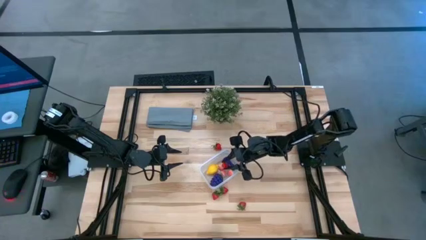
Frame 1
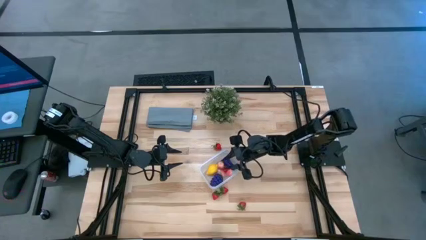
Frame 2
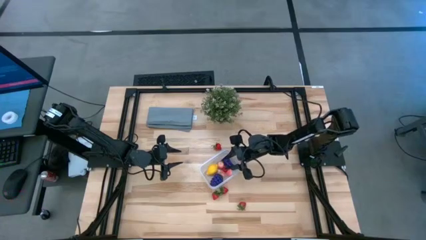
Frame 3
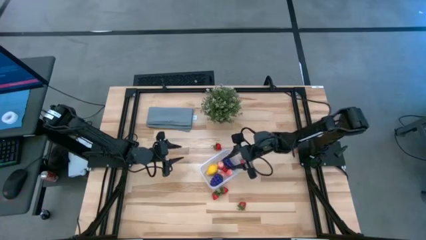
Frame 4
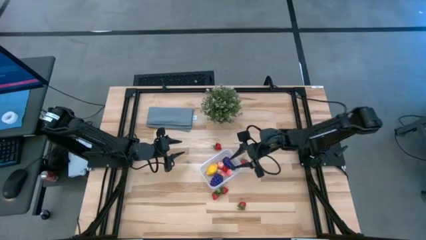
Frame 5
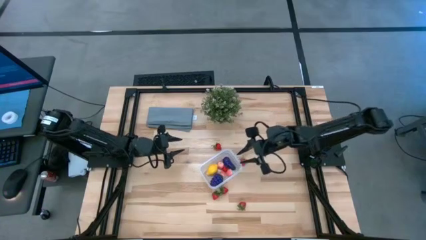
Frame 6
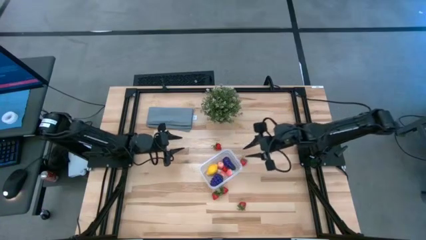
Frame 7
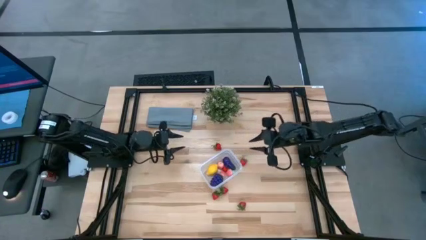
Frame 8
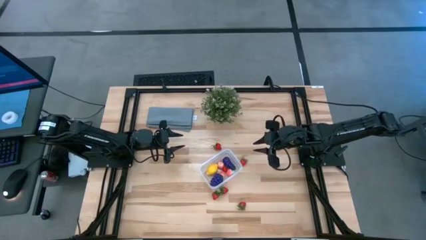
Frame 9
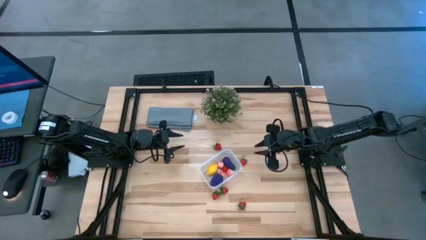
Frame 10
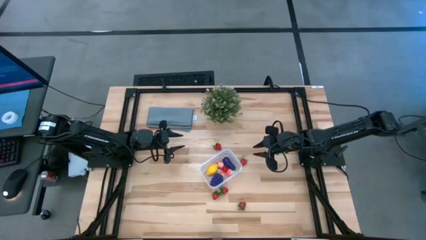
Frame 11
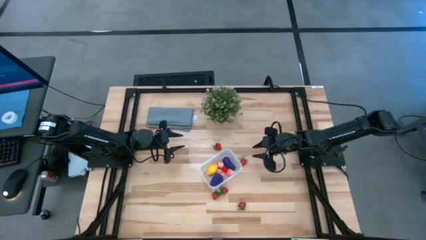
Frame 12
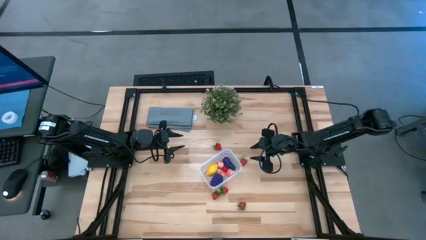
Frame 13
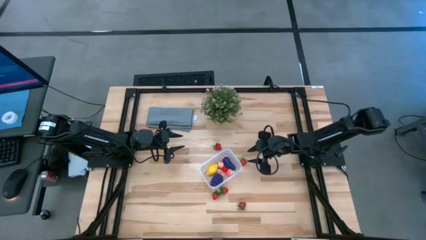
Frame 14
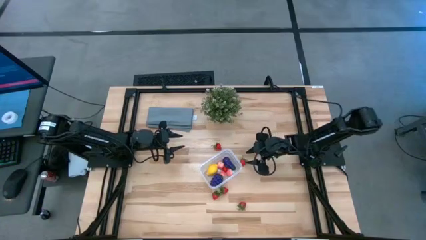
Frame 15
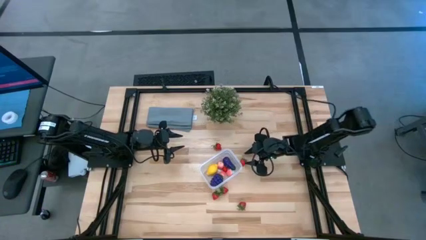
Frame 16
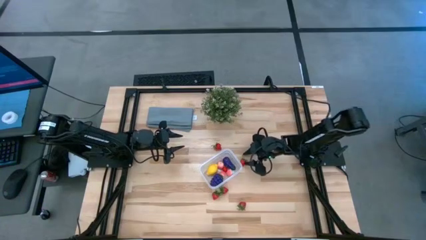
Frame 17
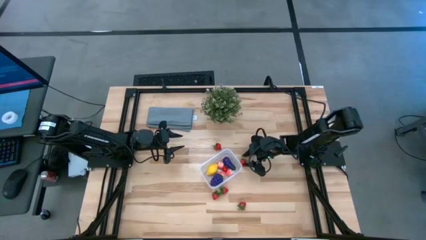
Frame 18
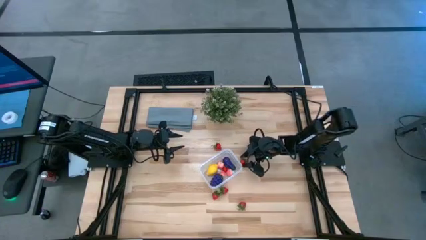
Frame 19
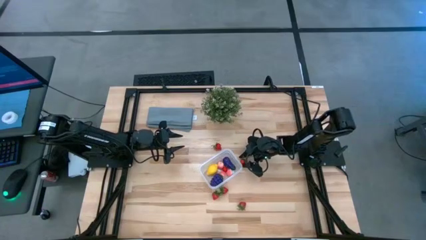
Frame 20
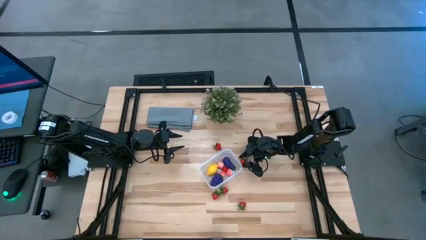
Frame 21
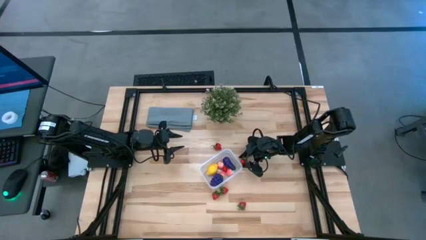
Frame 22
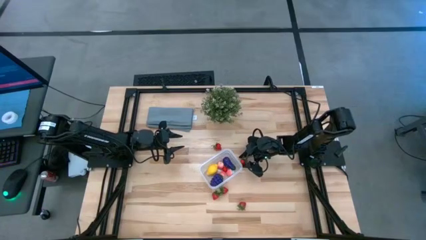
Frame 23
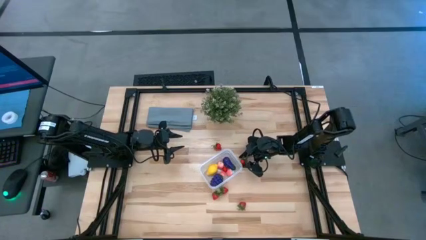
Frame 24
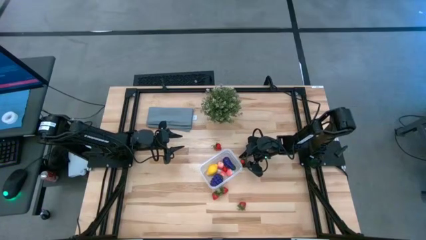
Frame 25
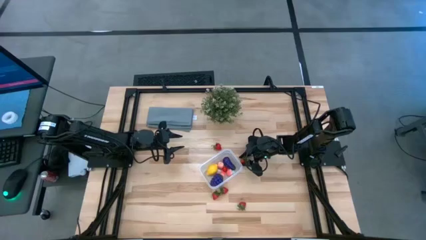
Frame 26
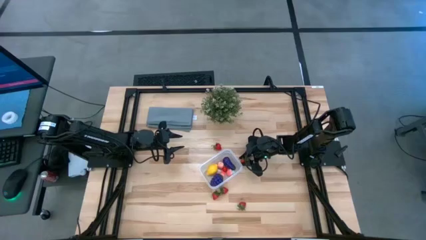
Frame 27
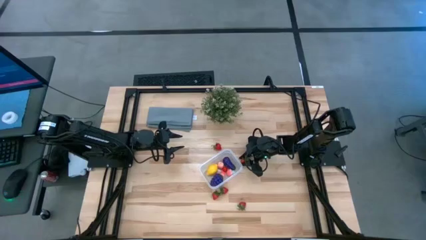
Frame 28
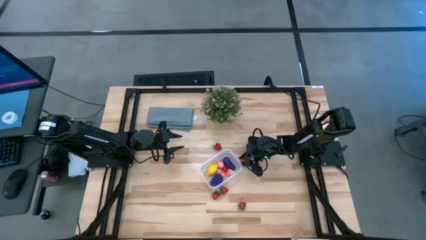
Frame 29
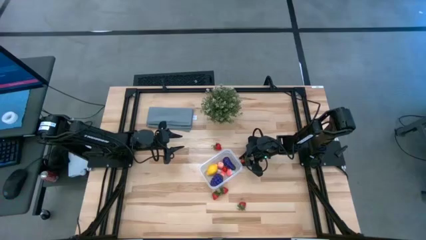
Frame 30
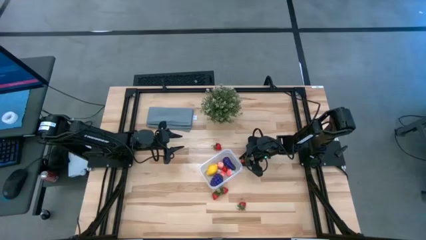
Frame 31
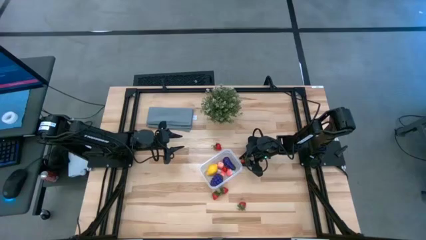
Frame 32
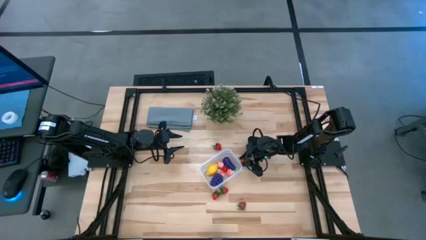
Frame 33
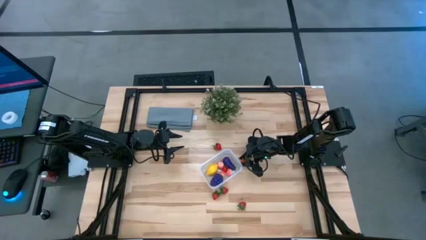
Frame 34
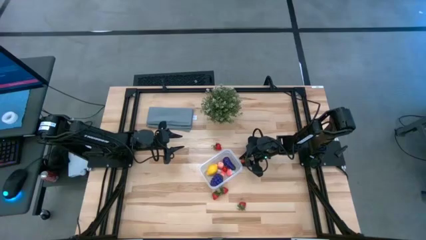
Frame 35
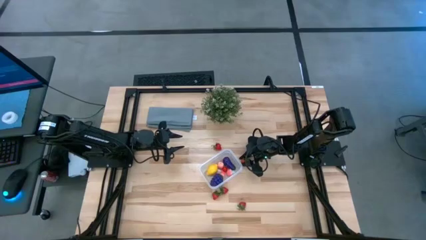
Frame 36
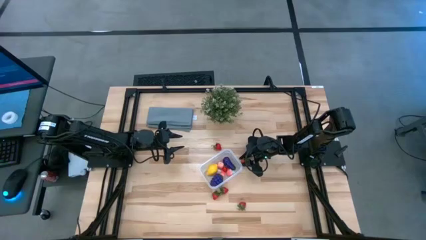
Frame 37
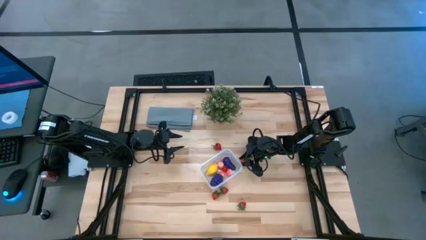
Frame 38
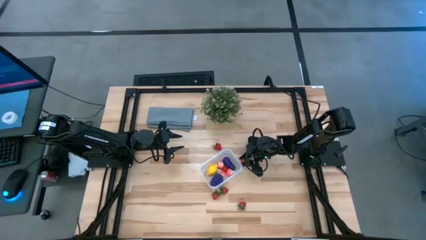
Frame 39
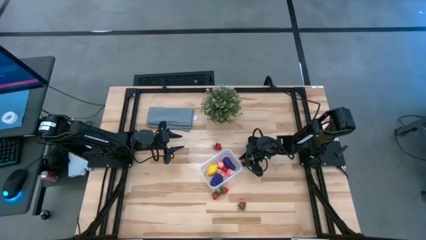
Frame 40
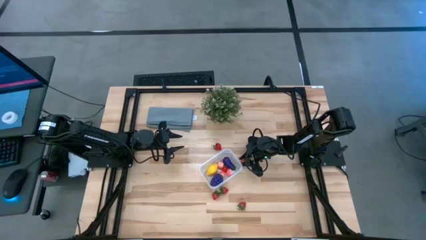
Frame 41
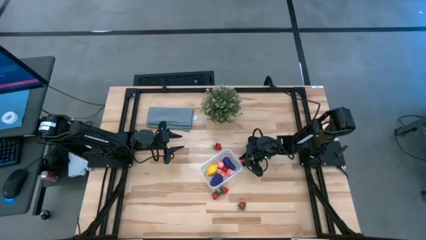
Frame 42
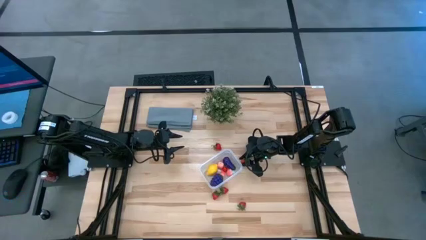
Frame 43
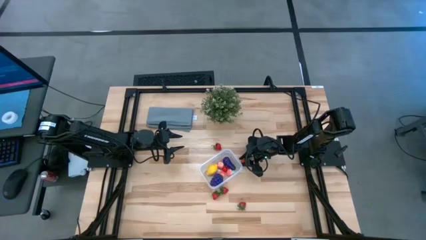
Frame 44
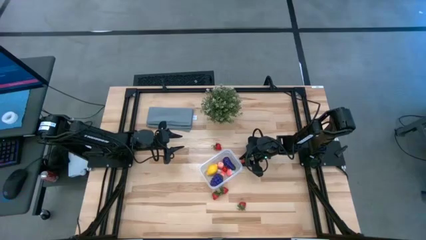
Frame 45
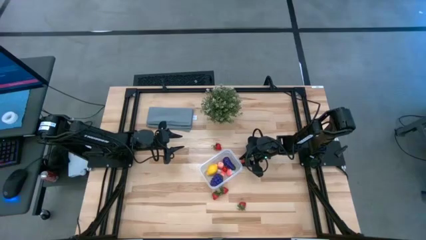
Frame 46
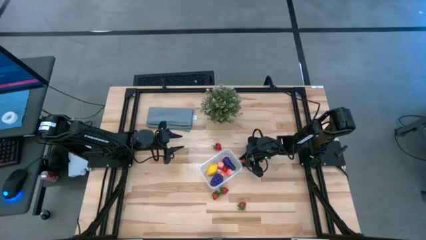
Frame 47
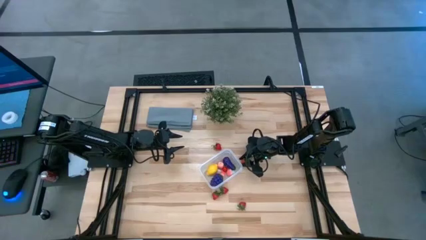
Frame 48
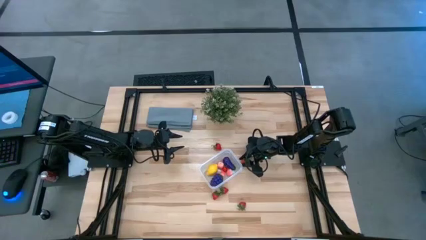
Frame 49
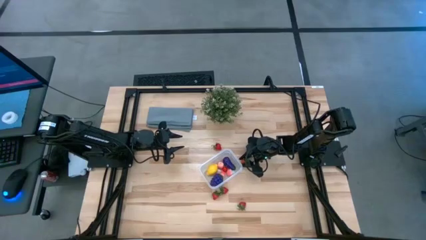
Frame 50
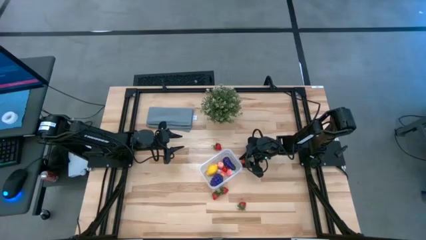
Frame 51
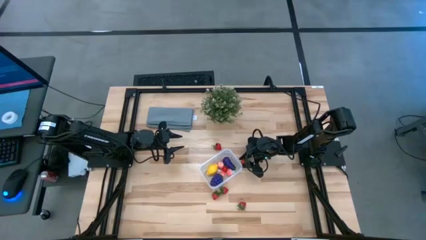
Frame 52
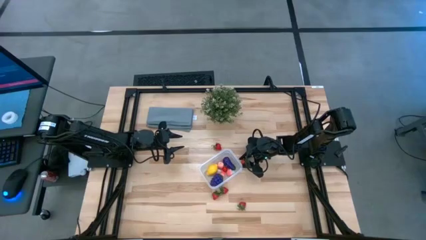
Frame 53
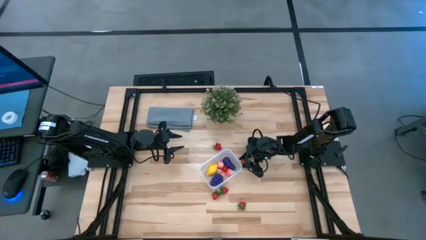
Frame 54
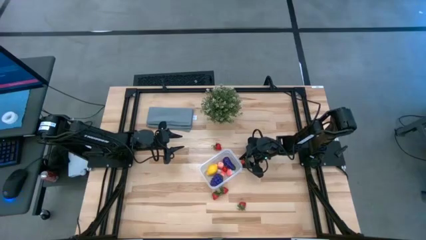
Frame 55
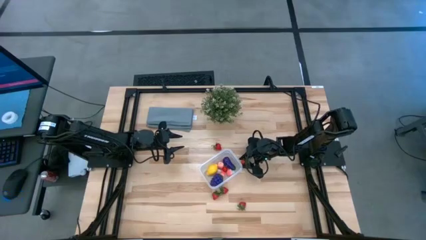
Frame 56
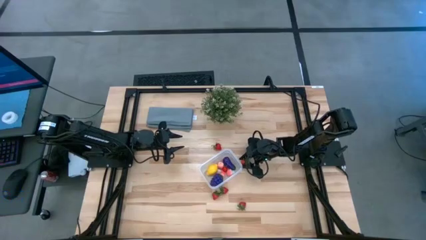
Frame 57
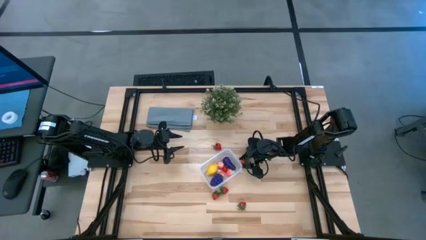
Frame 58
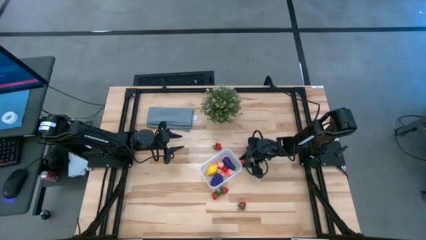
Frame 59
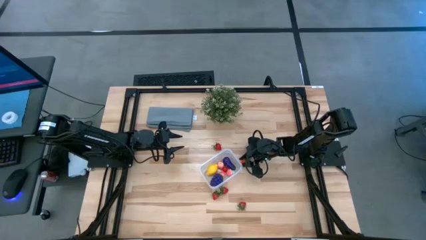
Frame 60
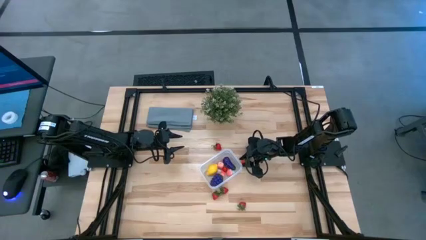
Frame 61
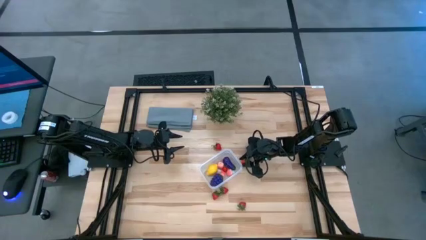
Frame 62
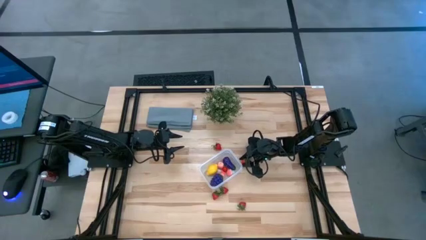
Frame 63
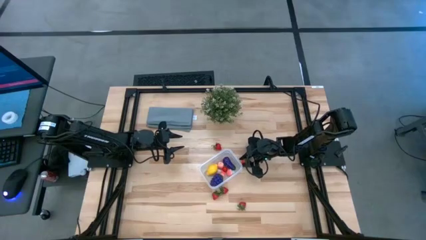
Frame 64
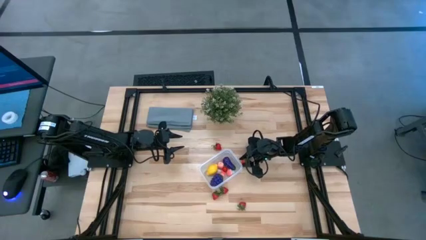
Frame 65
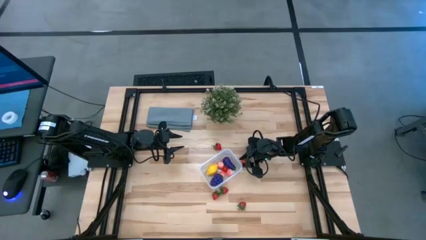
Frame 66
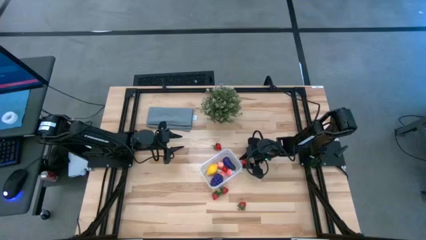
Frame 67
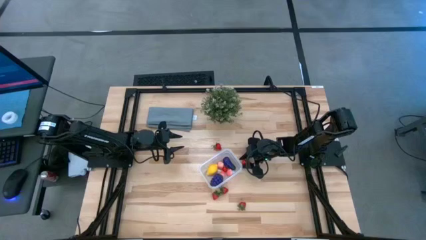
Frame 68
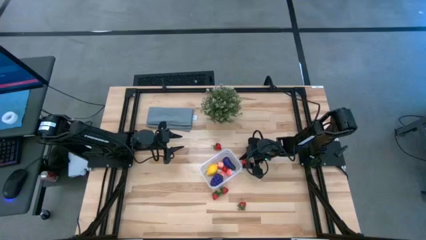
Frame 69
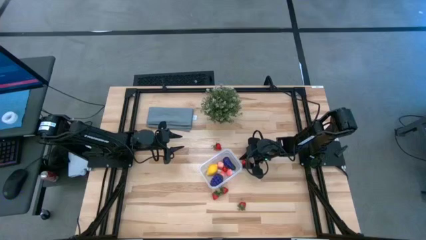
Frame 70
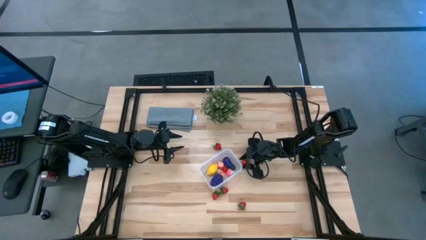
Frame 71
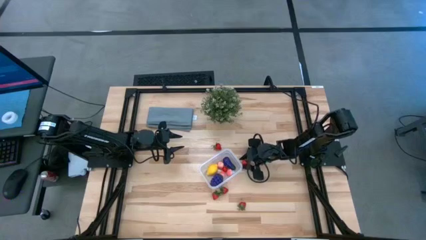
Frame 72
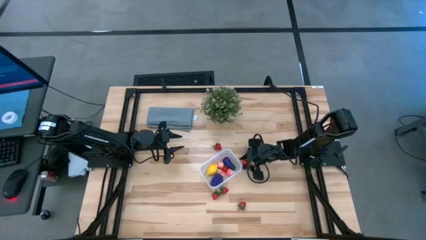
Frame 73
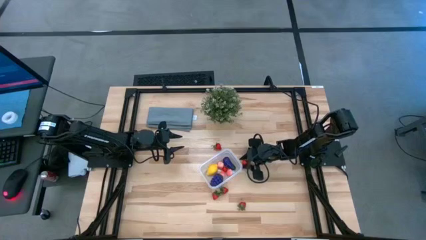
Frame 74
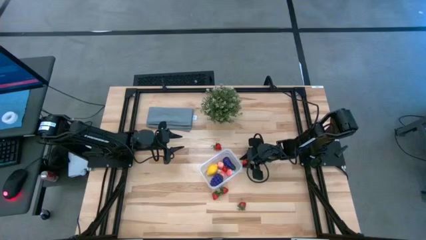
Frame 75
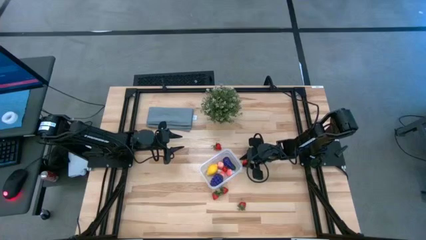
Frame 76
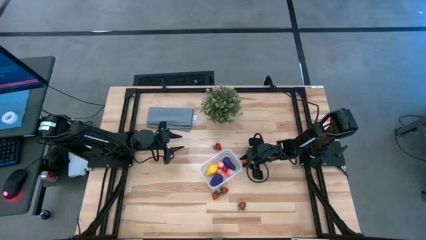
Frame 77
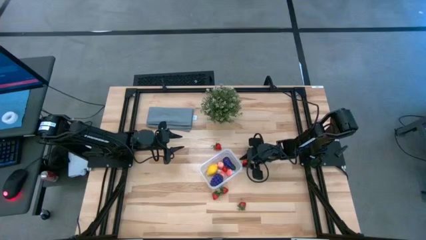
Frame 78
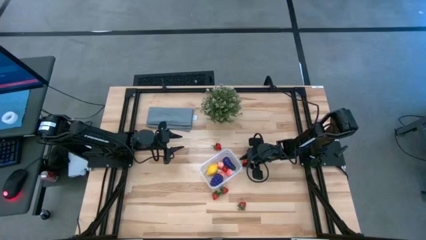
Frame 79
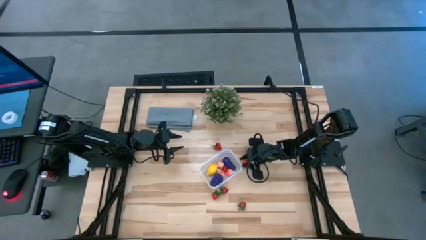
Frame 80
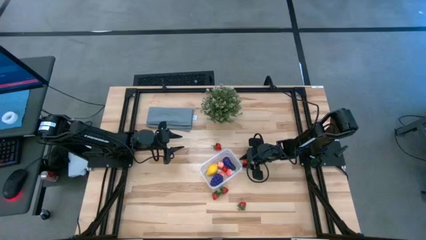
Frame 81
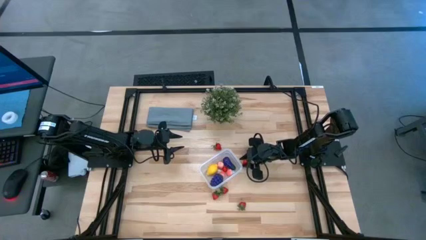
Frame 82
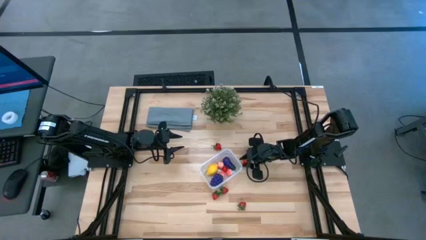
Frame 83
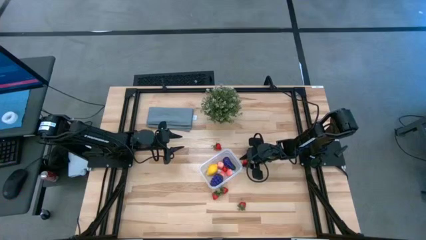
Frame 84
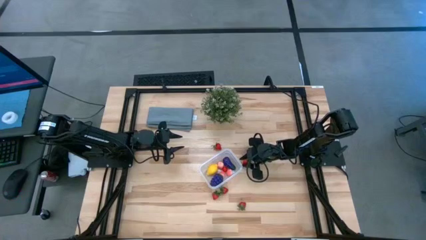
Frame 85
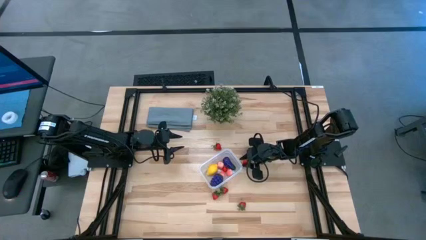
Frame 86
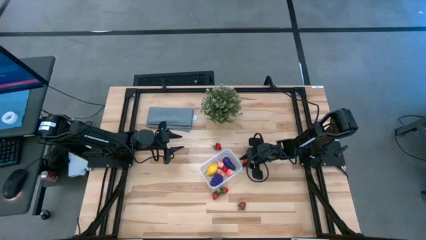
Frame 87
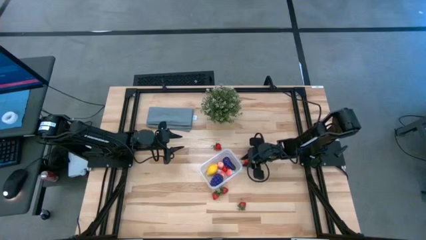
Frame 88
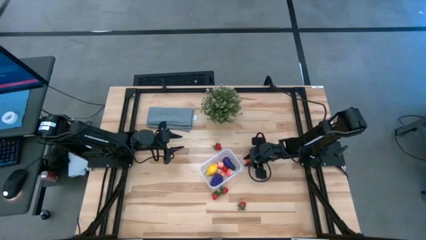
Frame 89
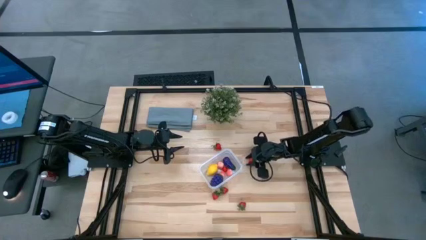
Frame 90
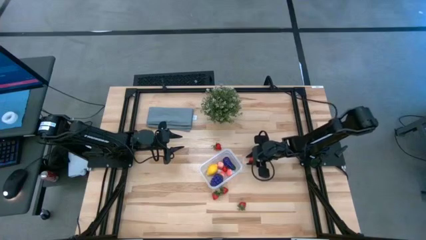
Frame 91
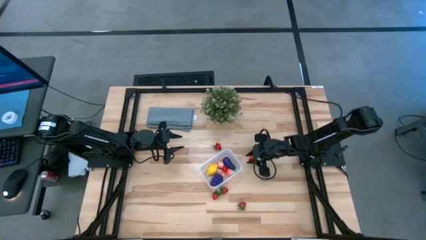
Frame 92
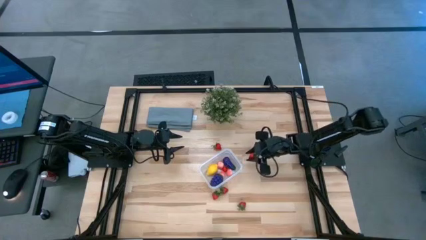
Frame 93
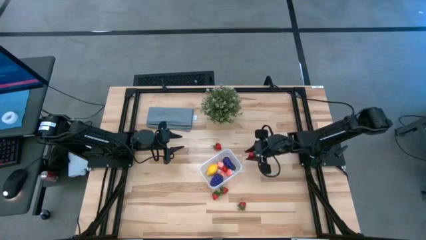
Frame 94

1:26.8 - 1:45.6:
Task: Pick and placing Produce into tupperware
Put the red strawberry into the transparent bin
